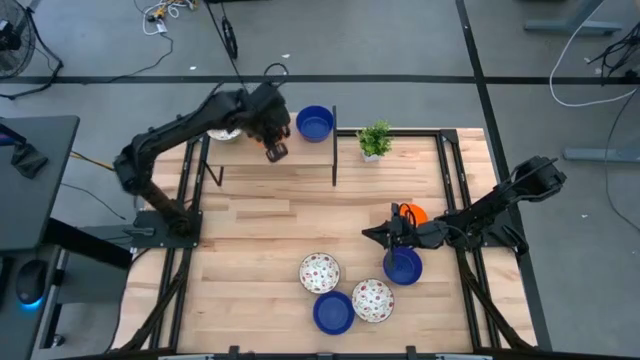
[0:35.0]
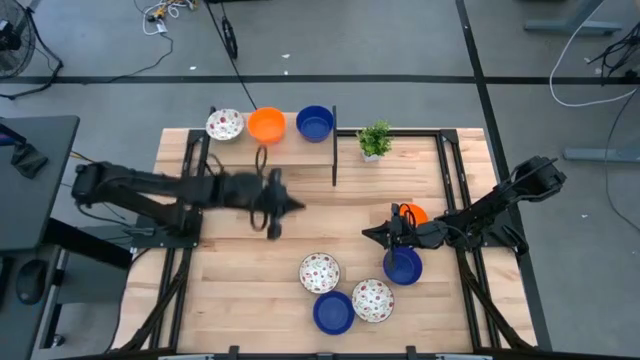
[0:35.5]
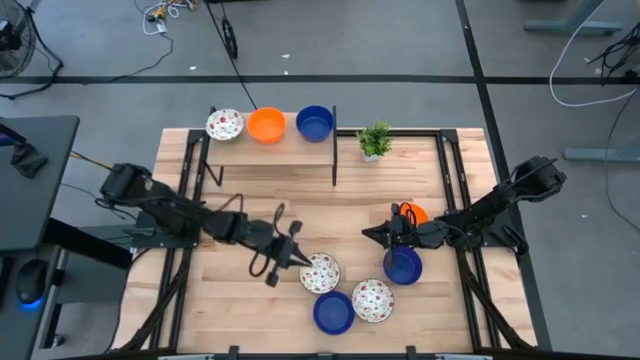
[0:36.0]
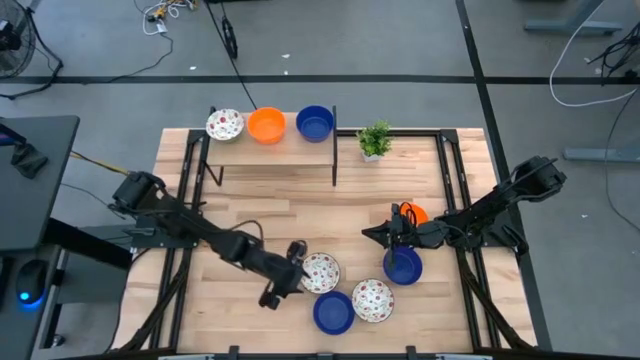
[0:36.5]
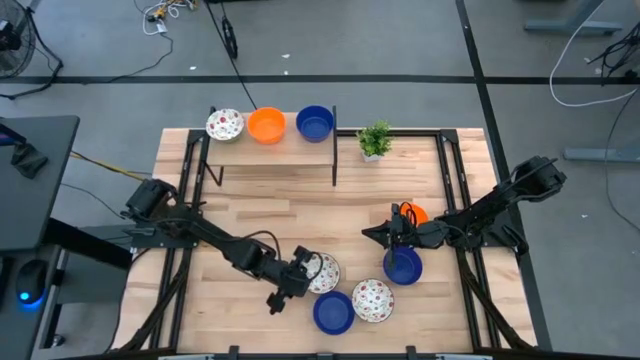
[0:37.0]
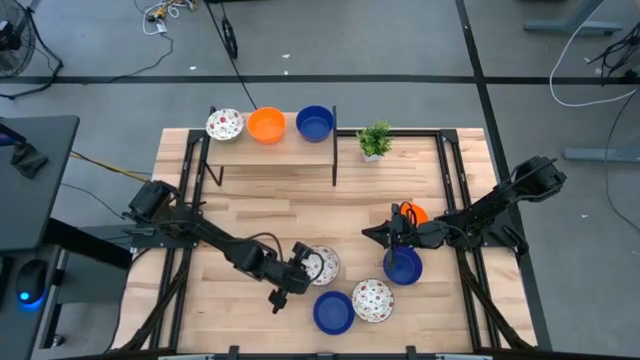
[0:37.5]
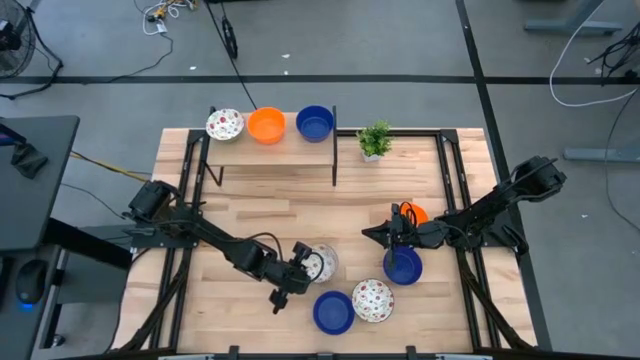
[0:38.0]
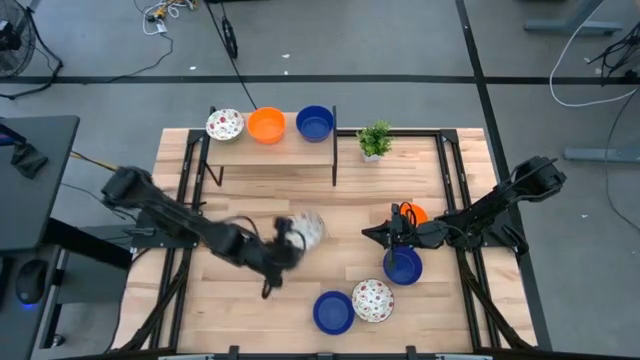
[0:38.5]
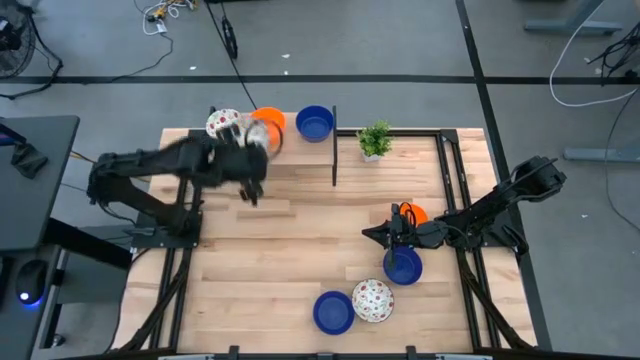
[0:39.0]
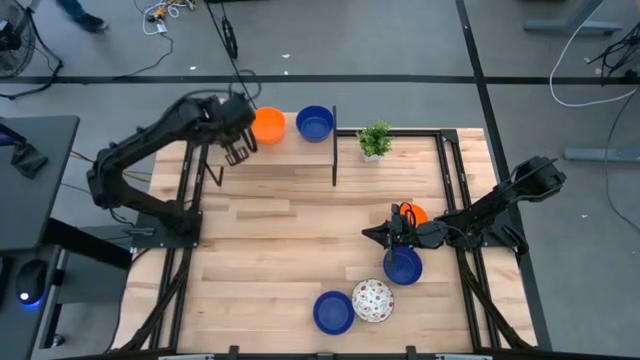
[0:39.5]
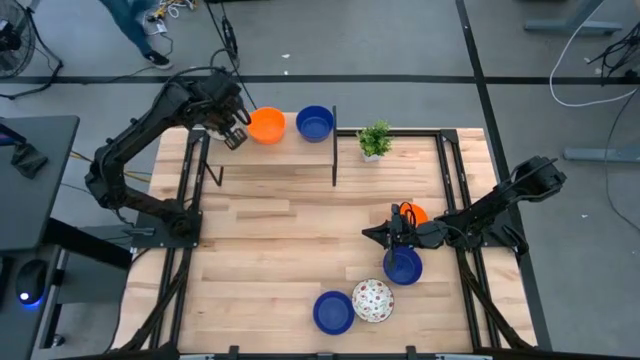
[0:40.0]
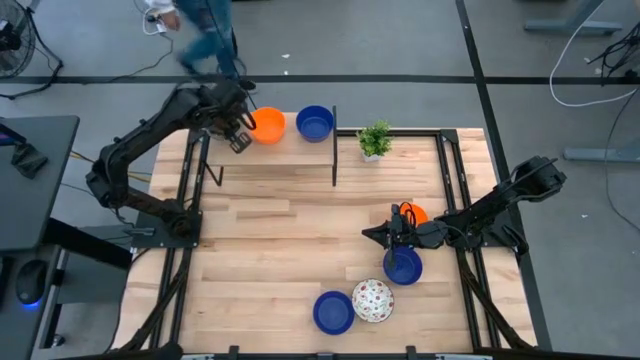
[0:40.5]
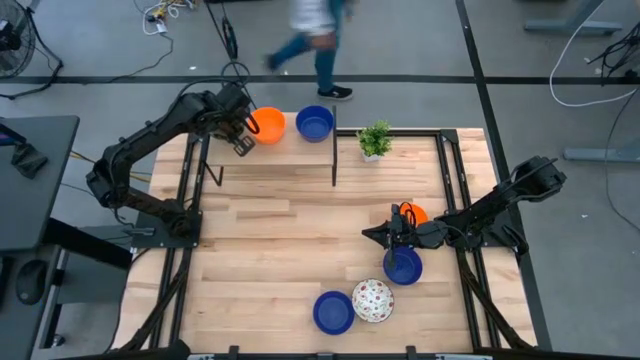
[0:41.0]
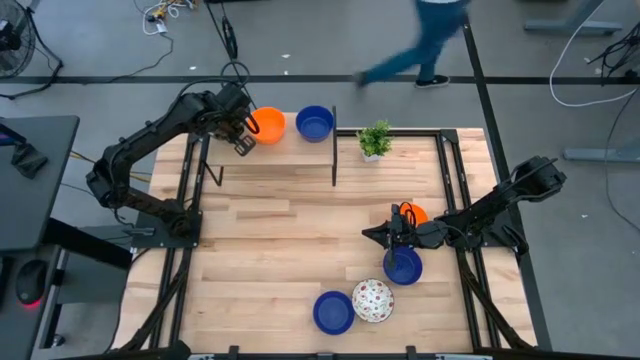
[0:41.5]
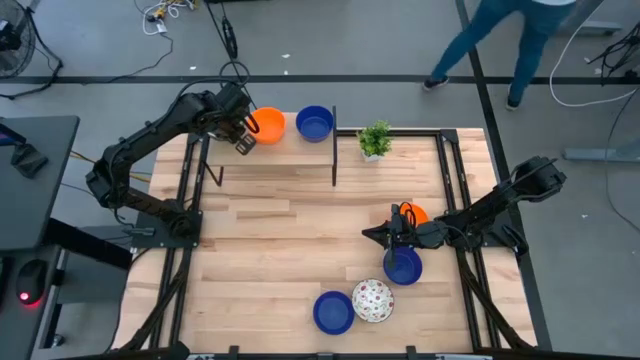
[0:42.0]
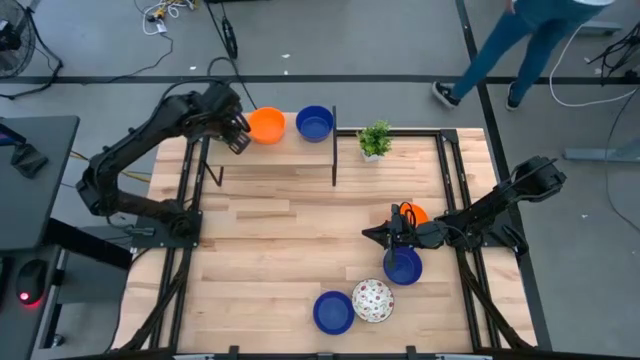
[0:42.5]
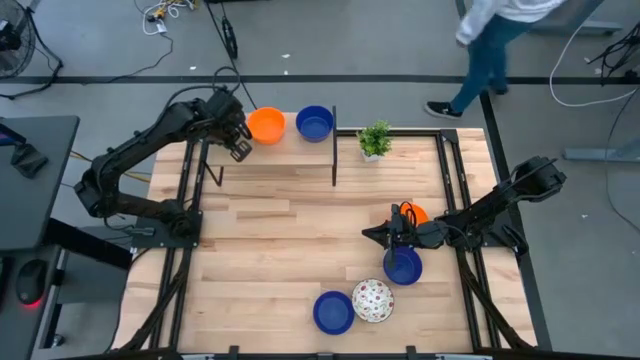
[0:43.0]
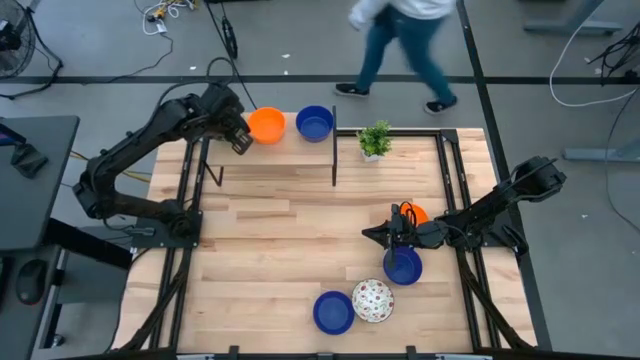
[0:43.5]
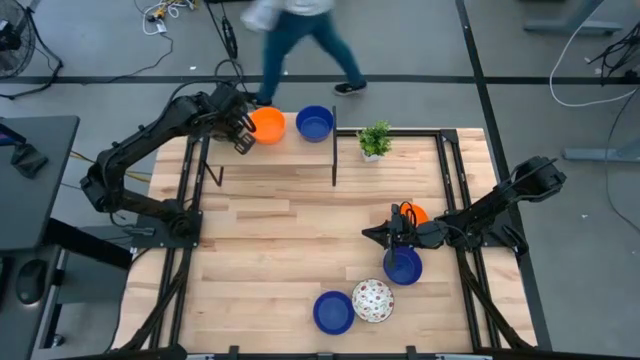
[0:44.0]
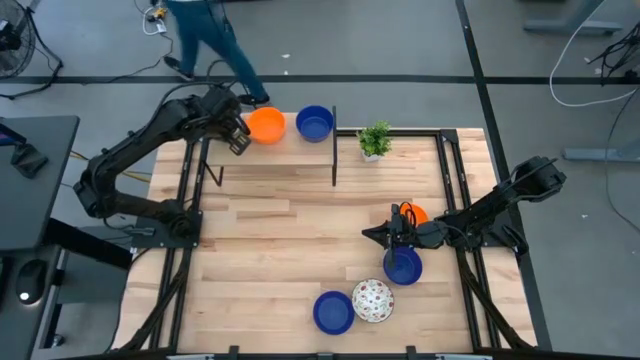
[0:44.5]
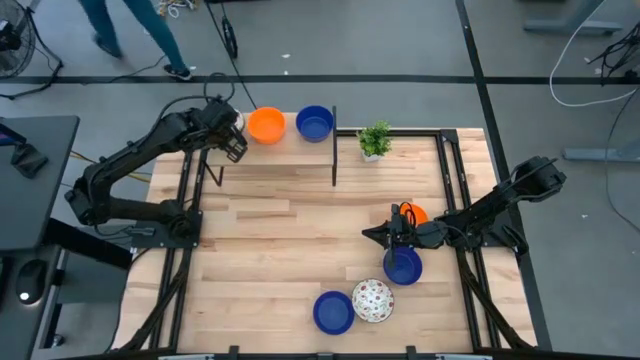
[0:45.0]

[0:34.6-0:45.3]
Task: Pick & Place Mini bowls
Stack the white bowl on top of the white bowl on the shelf

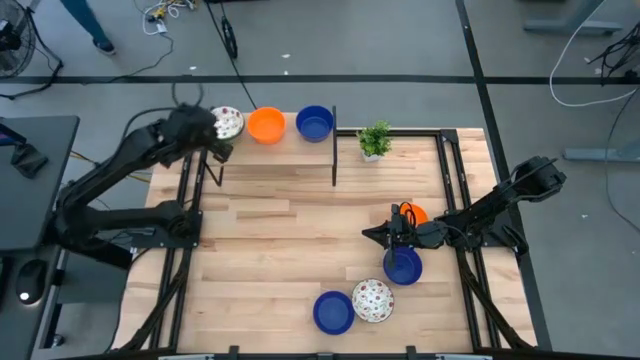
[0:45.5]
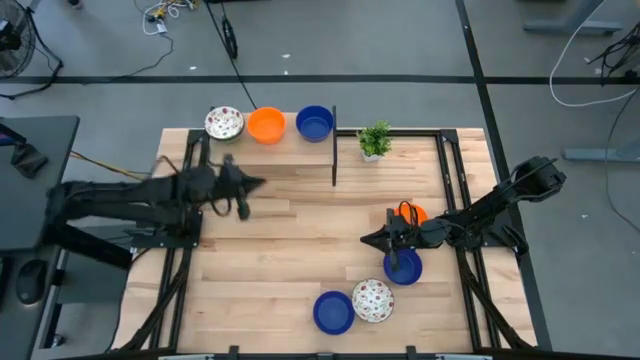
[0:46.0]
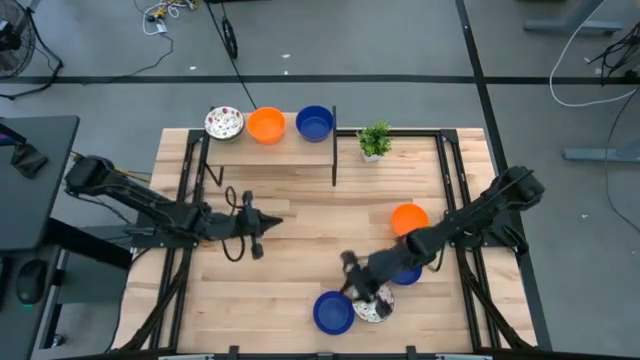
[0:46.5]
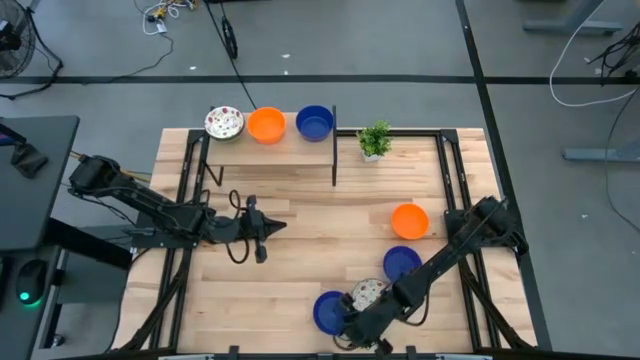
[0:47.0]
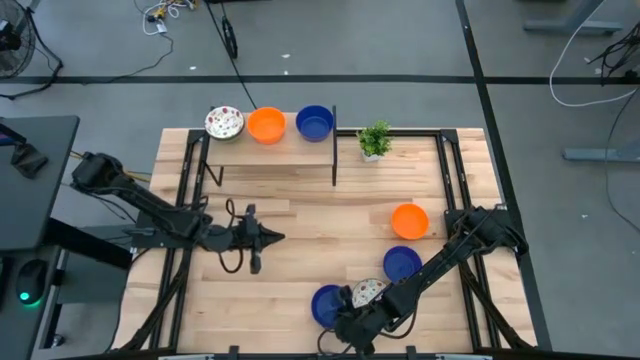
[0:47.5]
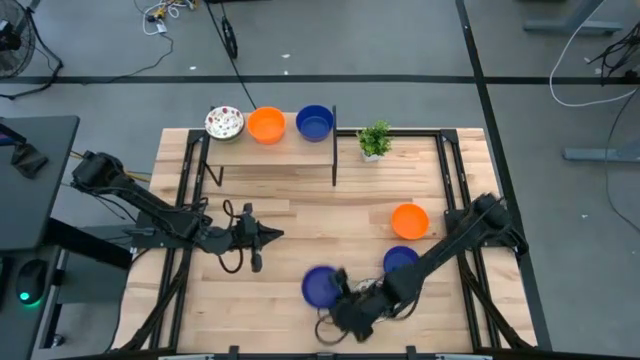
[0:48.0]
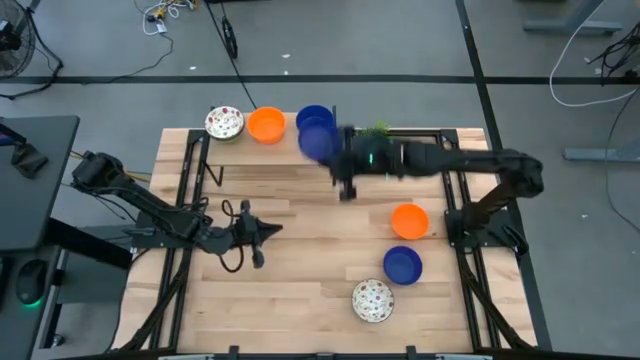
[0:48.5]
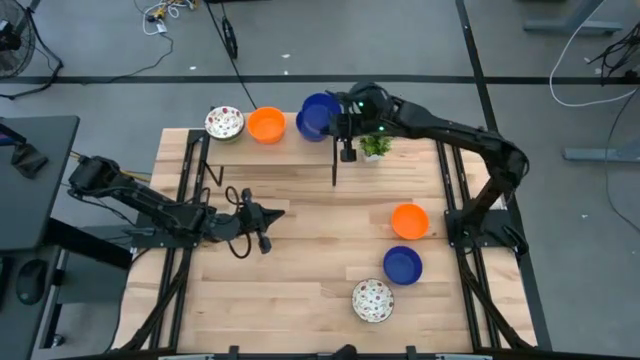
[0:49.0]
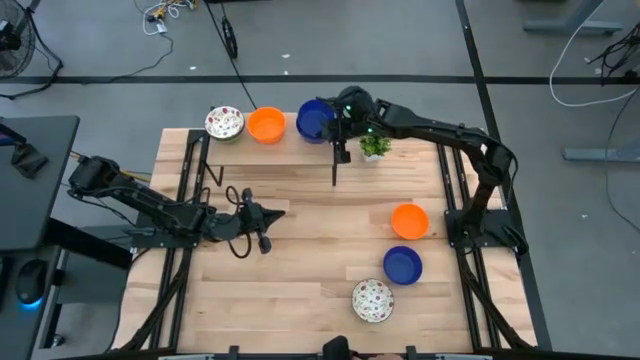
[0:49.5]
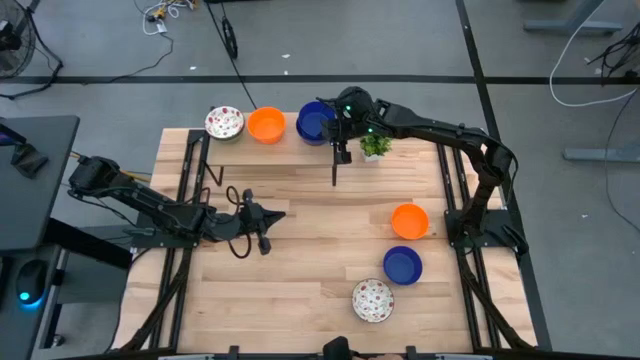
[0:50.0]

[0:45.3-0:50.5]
Stack the blue bowl on top of the stacked blue bowls on the shelf

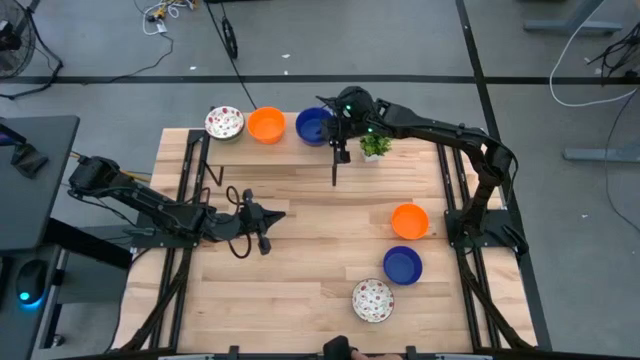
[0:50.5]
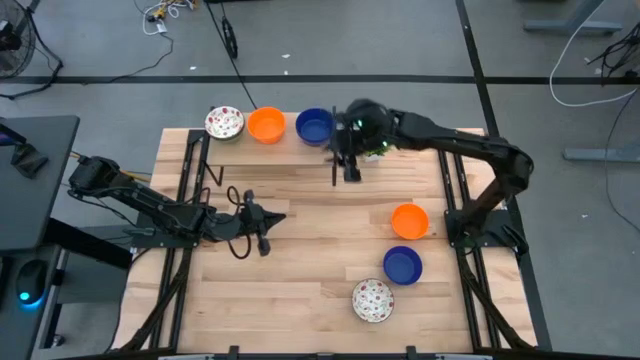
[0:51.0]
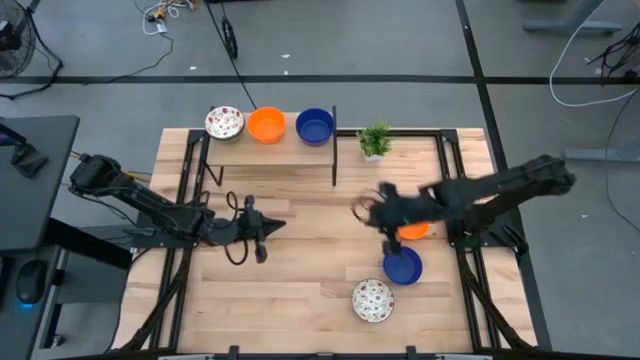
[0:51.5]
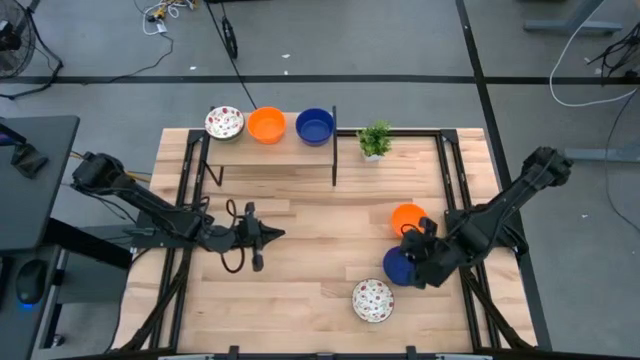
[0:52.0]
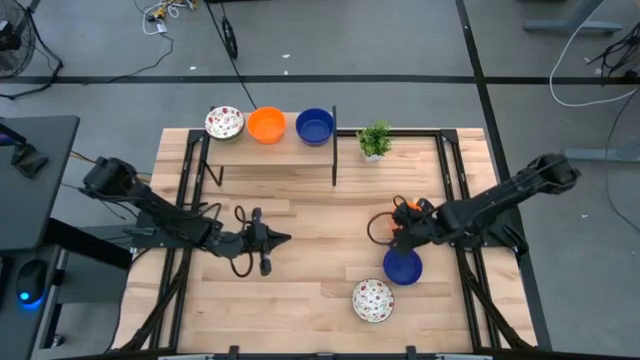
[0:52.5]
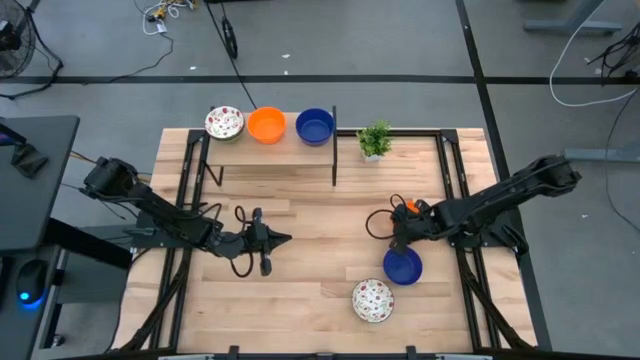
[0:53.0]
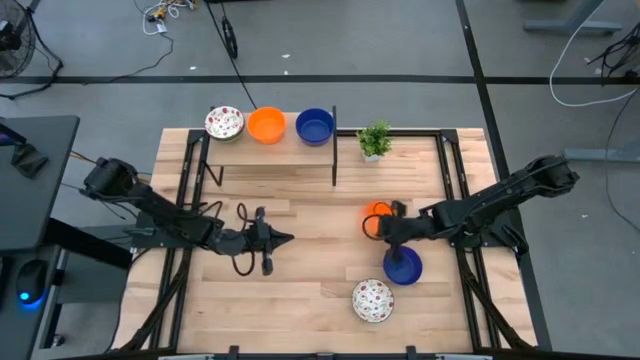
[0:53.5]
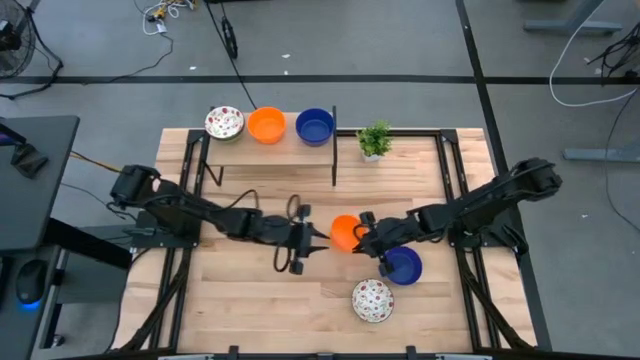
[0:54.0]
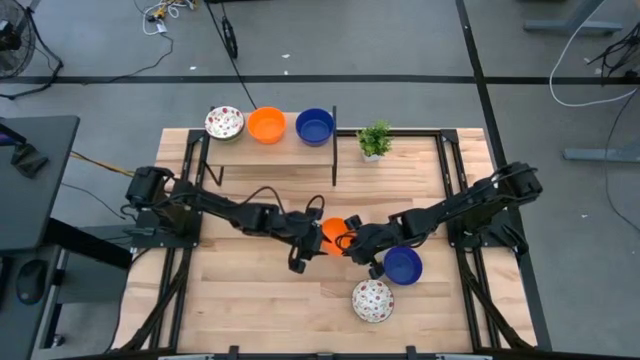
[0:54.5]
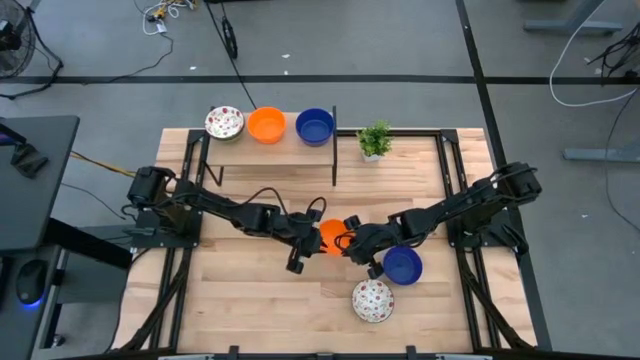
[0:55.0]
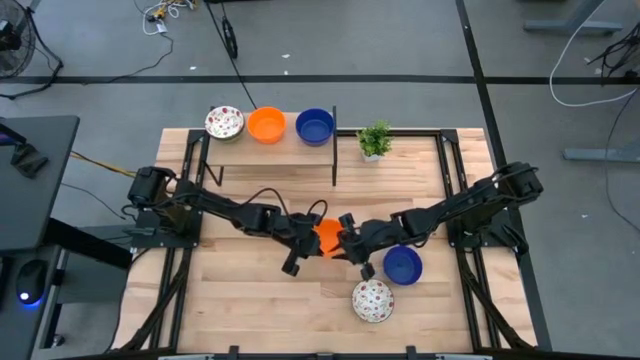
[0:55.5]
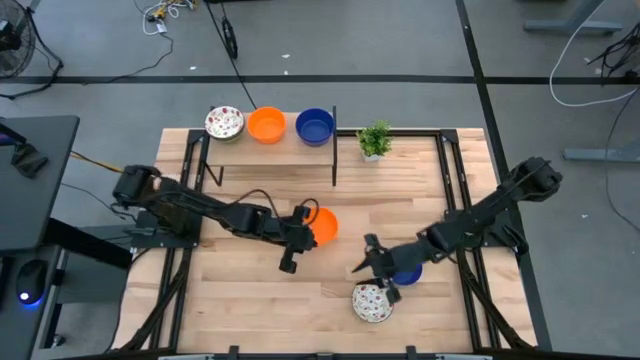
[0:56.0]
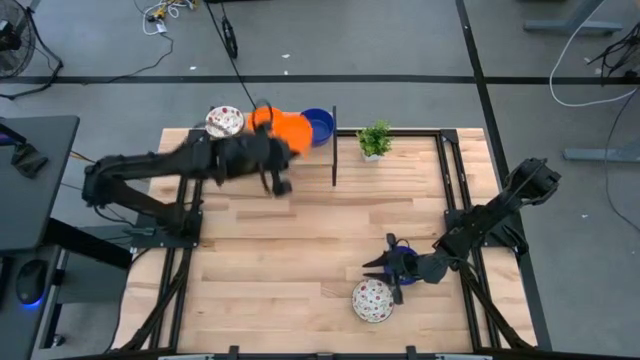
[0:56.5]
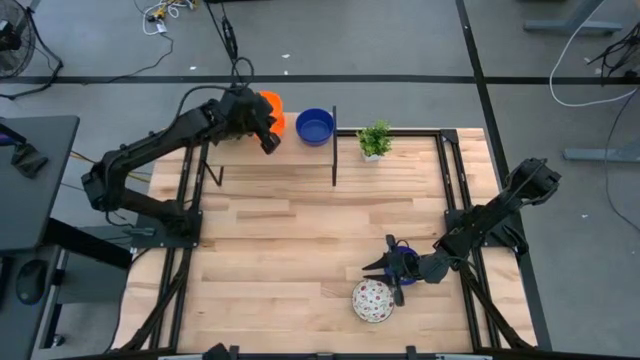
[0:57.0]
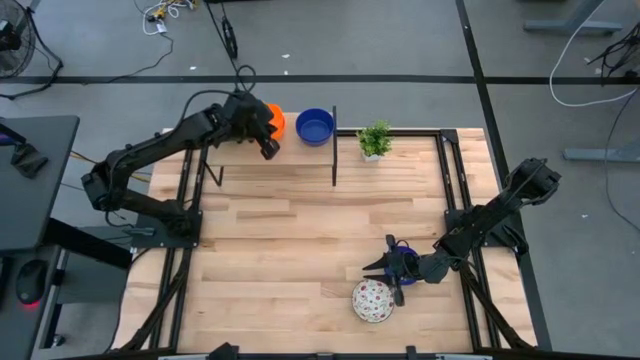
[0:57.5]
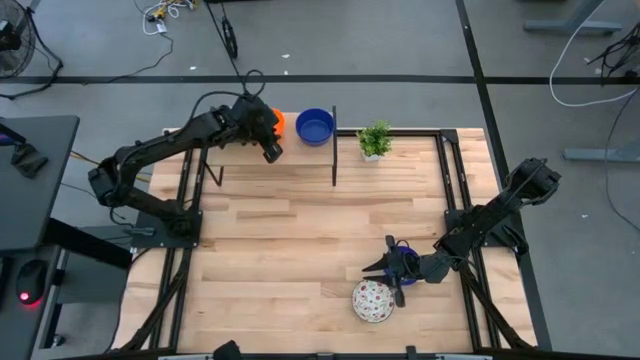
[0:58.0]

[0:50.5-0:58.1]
Stack the orange bowl on top of the stacked orange bowls on the shelf
